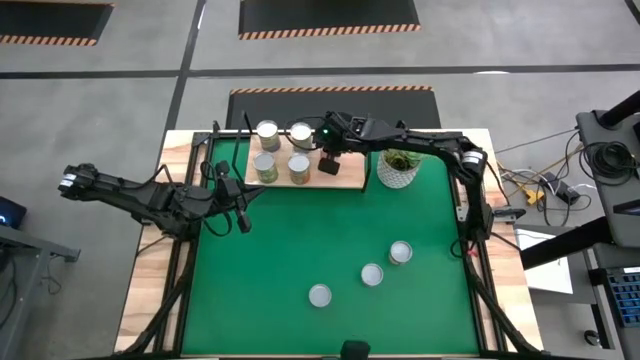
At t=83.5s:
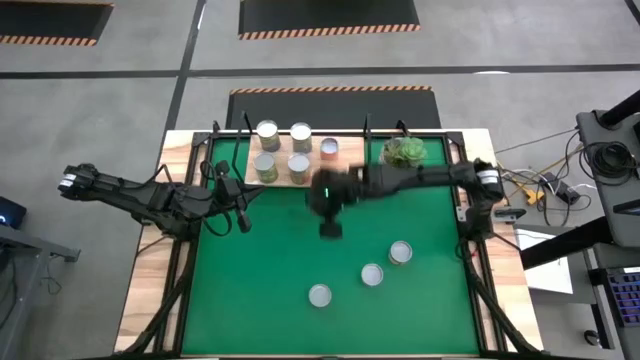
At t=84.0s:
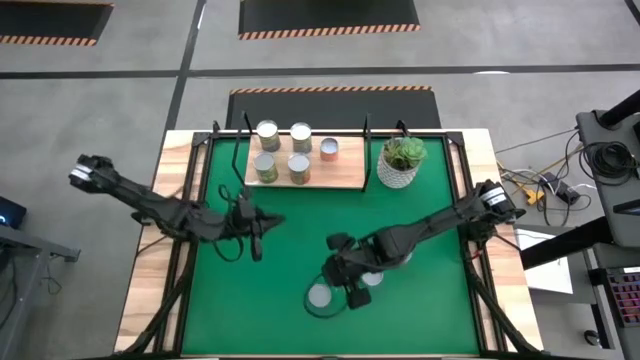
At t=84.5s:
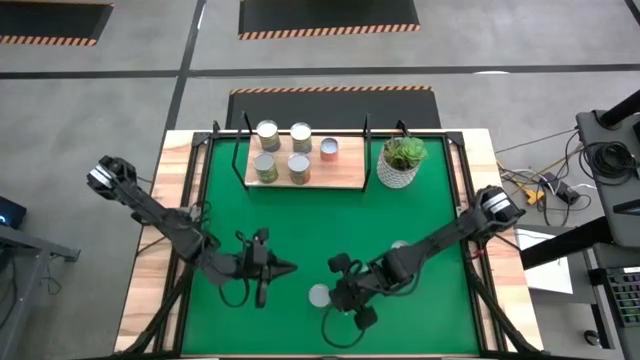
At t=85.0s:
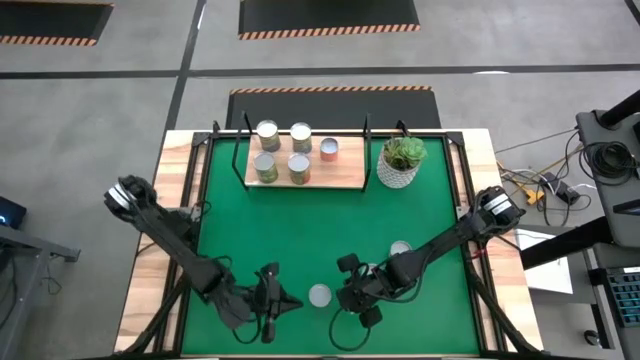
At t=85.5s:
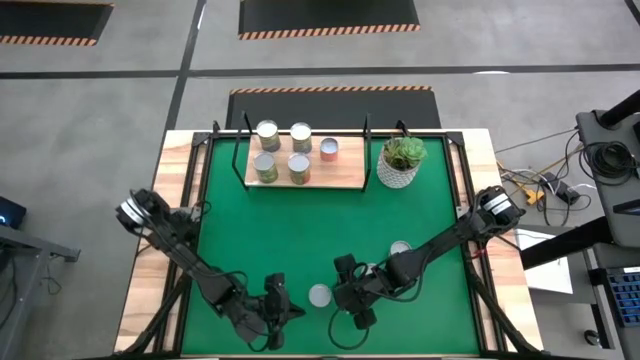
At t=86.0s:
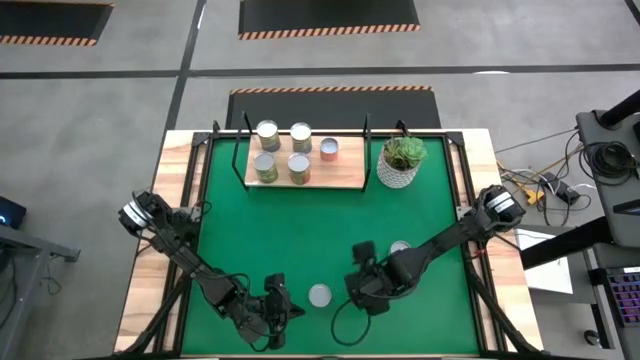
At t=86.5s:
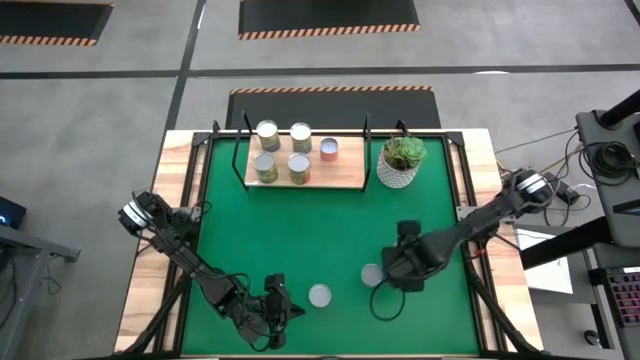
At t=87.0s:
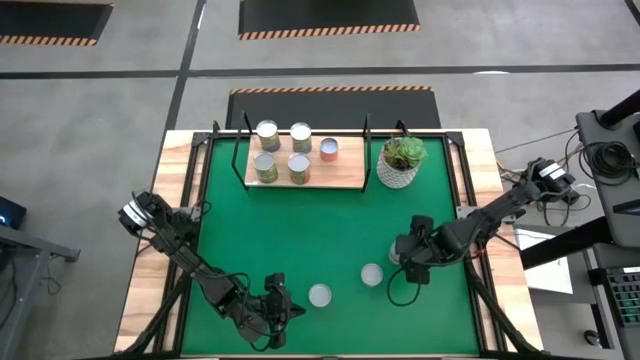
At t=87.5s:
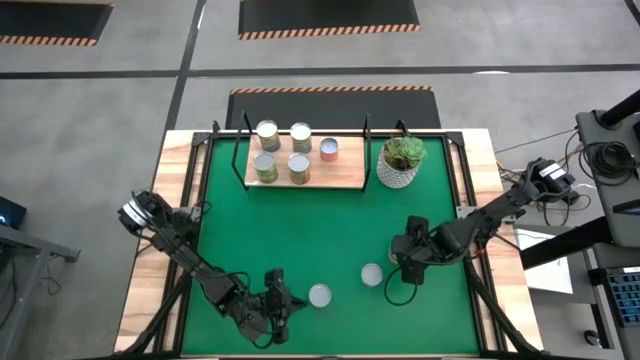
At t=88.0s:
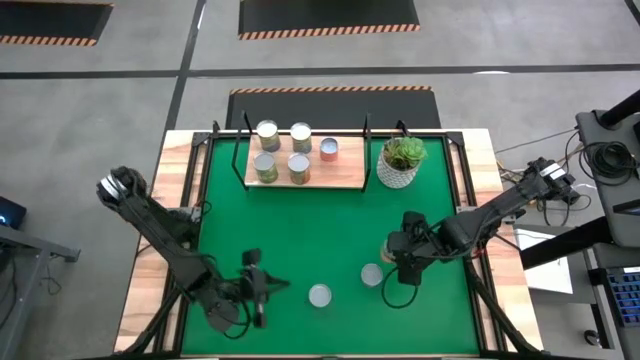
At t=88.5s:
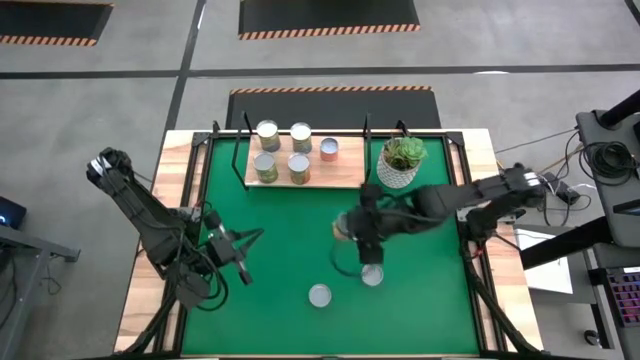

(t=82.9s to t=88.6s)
Task: Pick and place cans onto a shelf
Put the canned peach on the shelf

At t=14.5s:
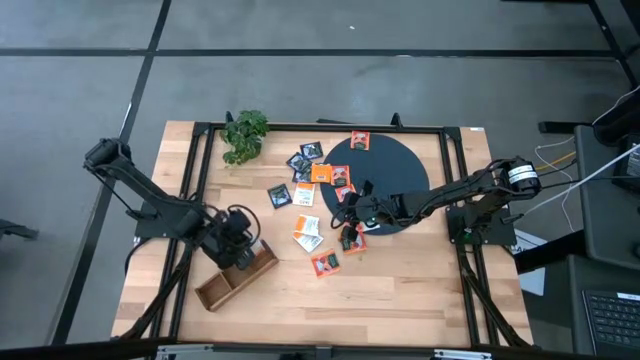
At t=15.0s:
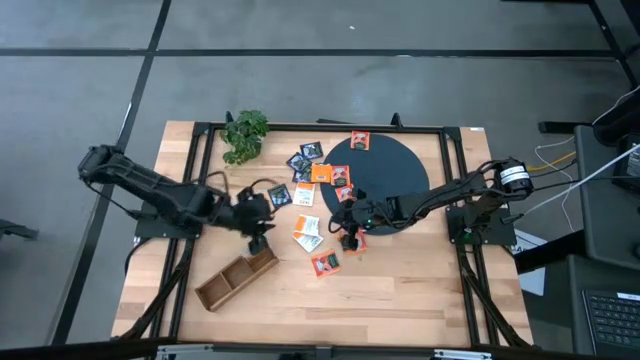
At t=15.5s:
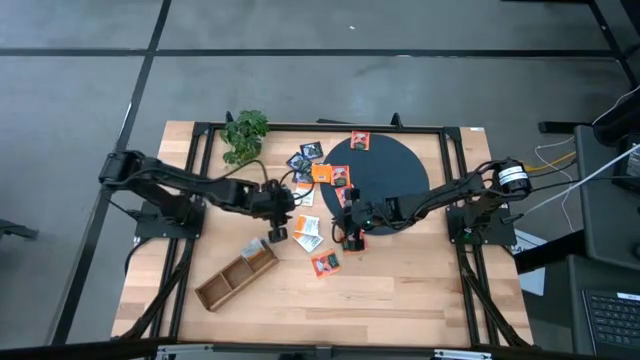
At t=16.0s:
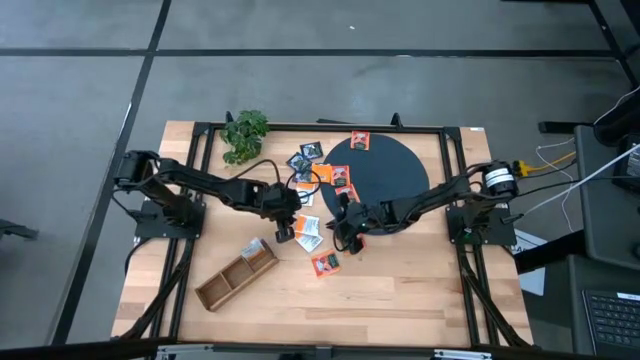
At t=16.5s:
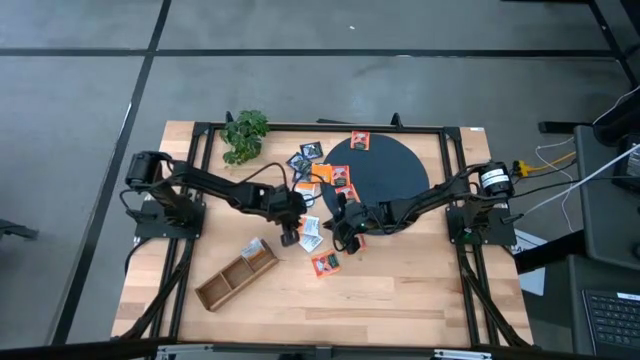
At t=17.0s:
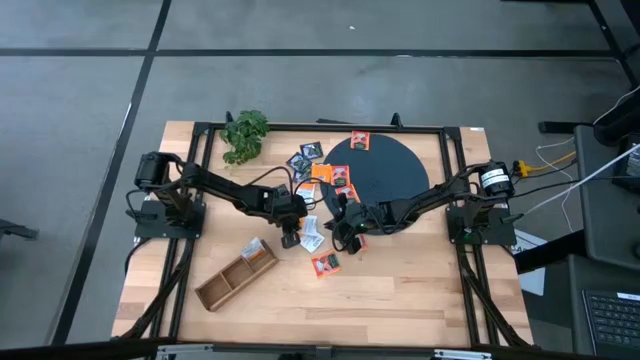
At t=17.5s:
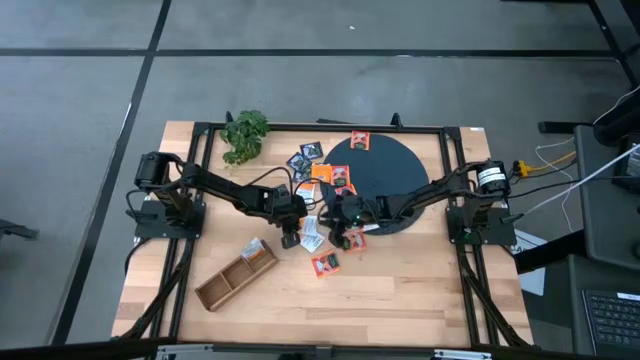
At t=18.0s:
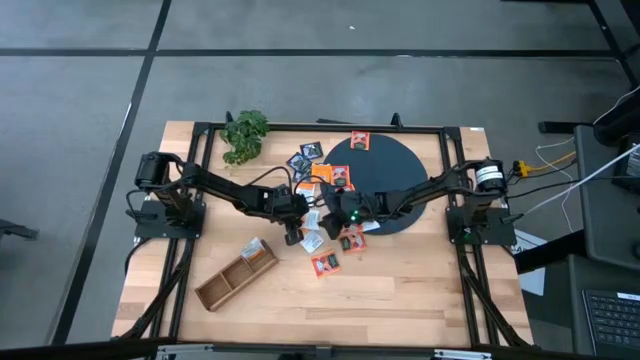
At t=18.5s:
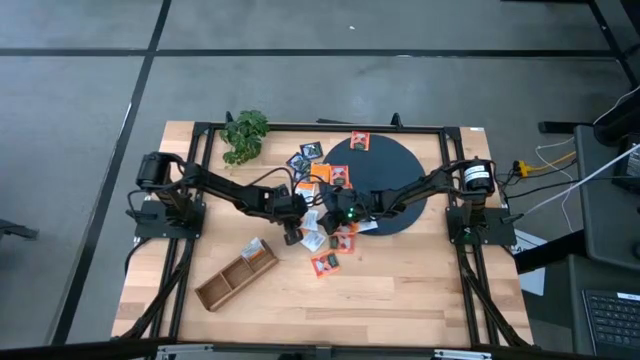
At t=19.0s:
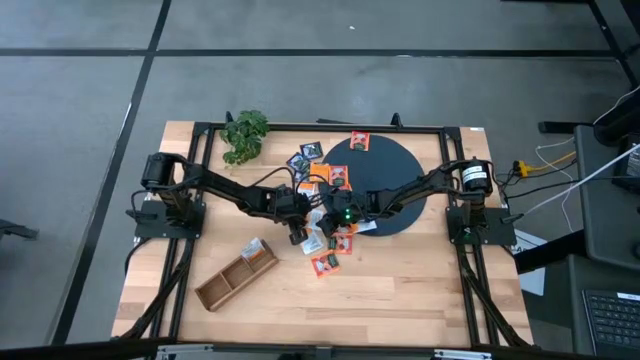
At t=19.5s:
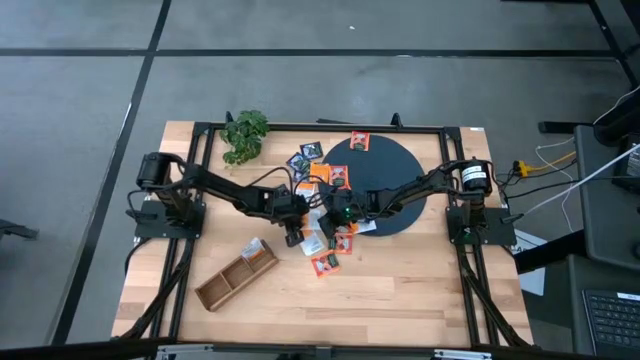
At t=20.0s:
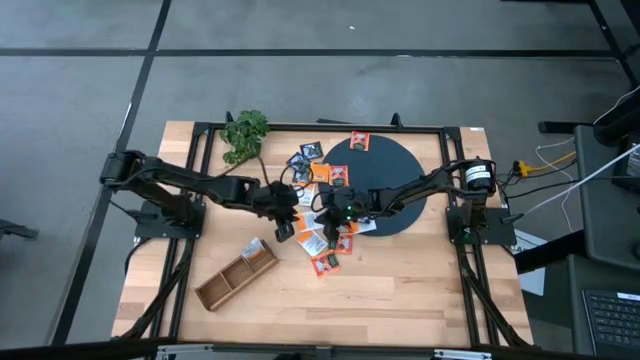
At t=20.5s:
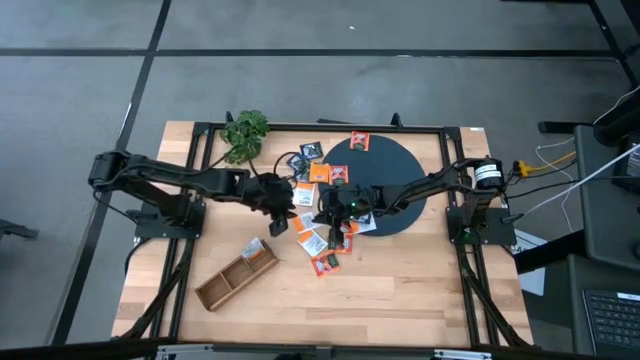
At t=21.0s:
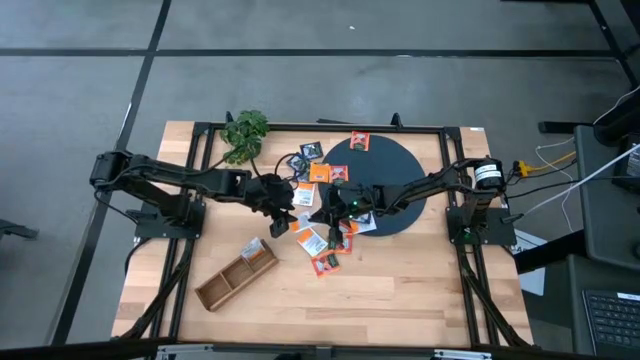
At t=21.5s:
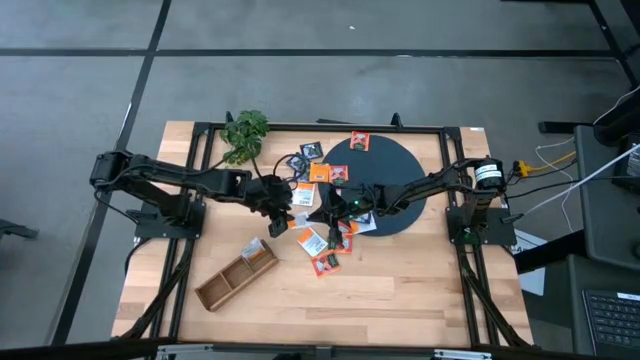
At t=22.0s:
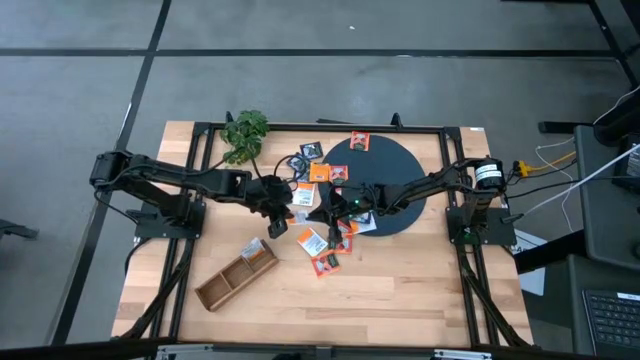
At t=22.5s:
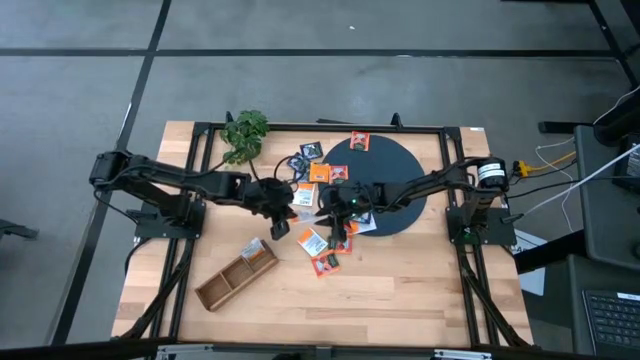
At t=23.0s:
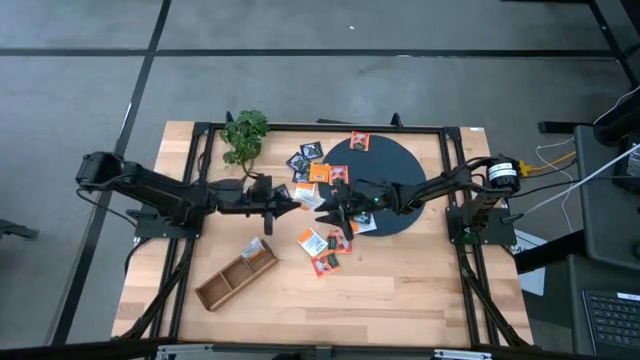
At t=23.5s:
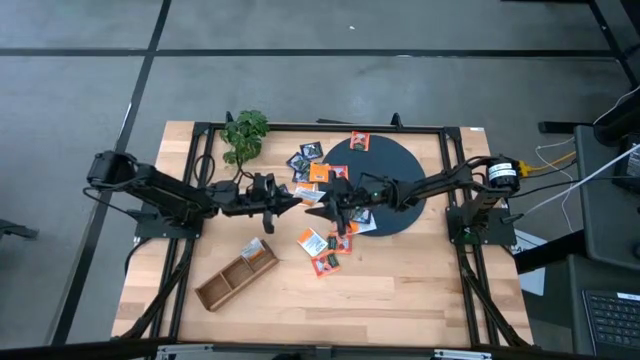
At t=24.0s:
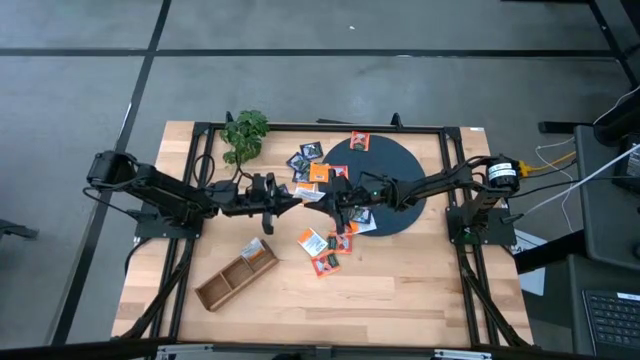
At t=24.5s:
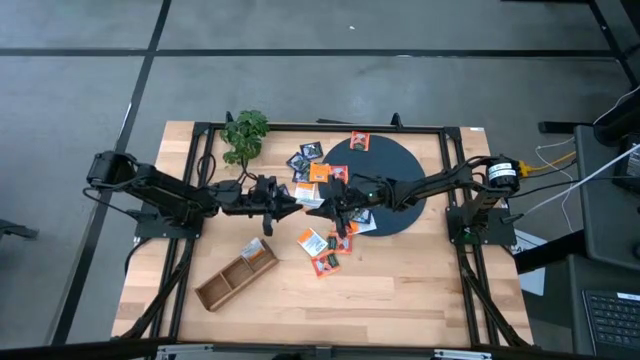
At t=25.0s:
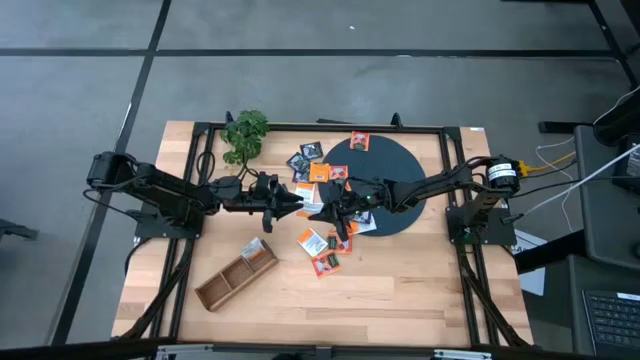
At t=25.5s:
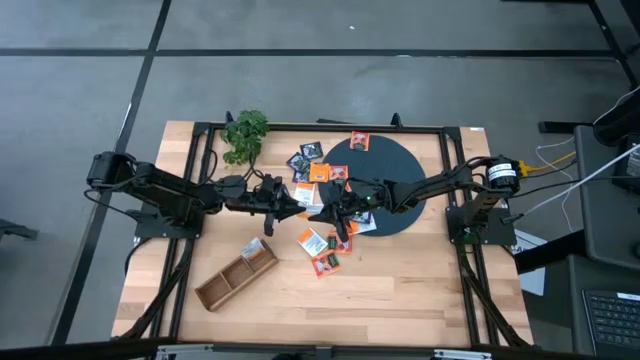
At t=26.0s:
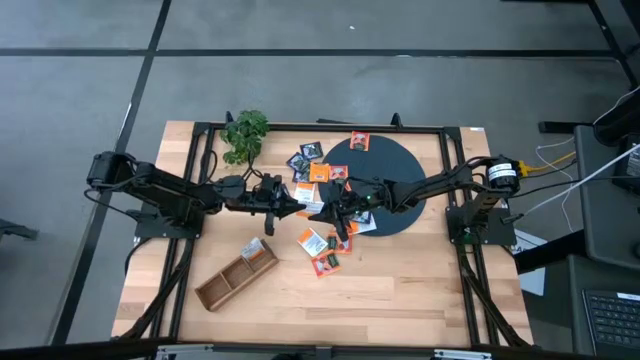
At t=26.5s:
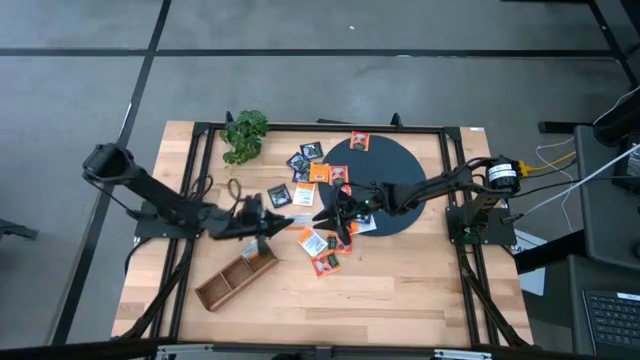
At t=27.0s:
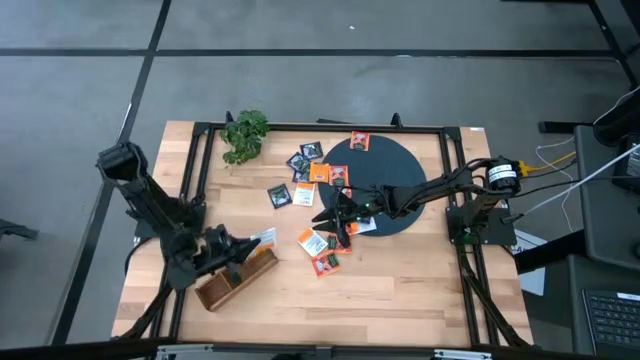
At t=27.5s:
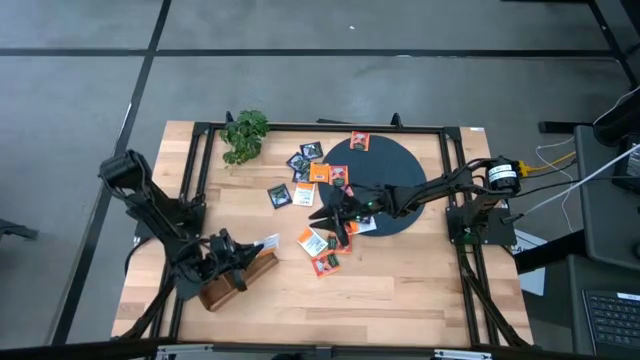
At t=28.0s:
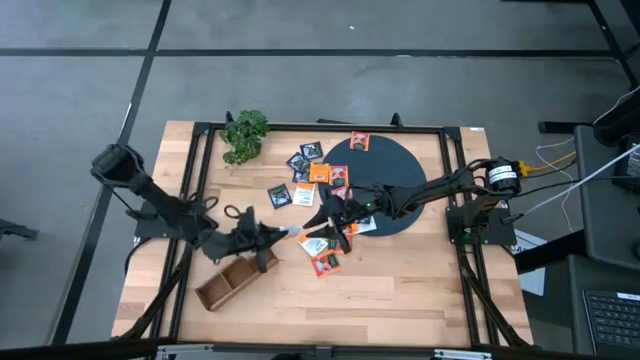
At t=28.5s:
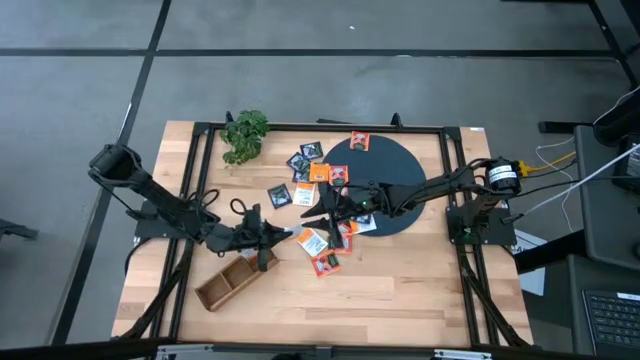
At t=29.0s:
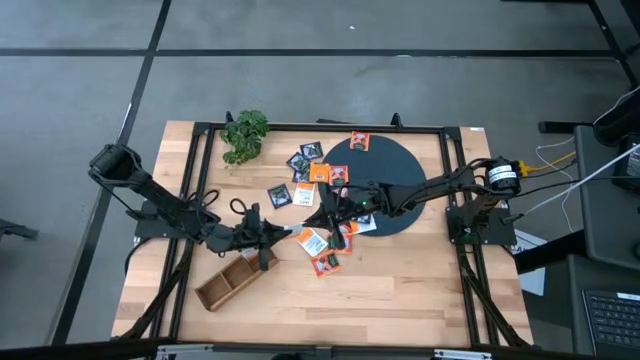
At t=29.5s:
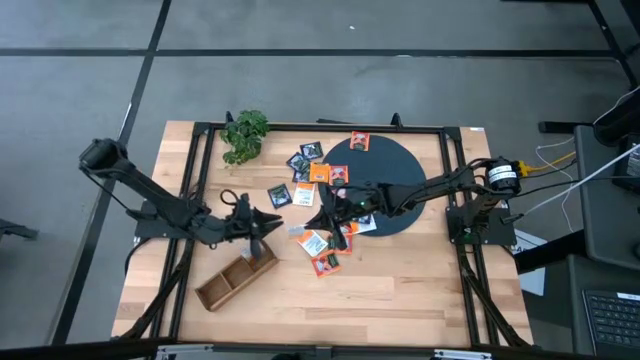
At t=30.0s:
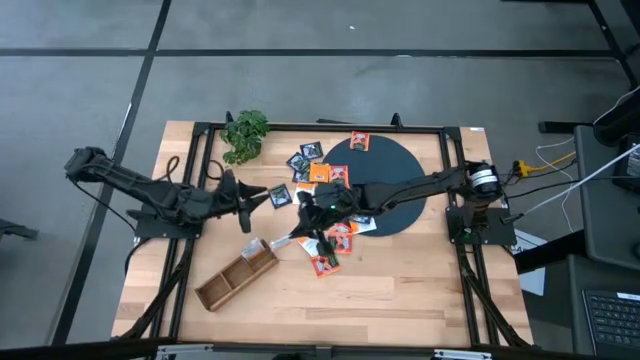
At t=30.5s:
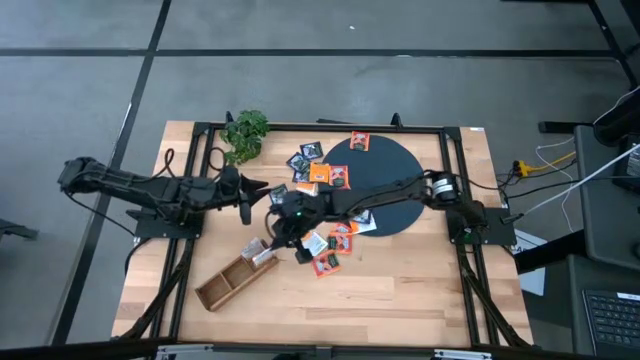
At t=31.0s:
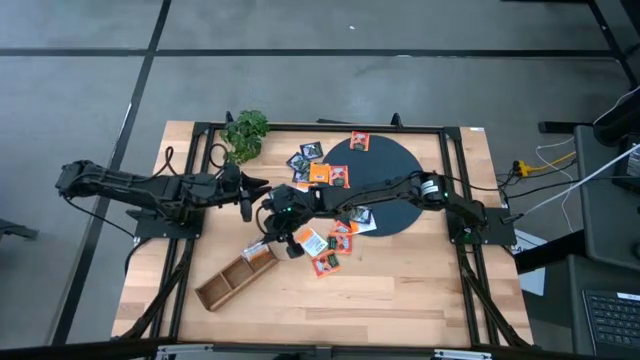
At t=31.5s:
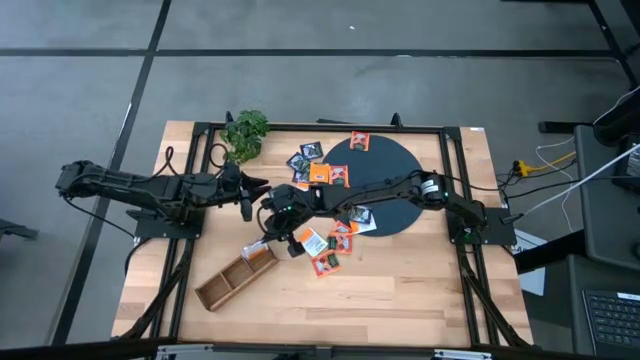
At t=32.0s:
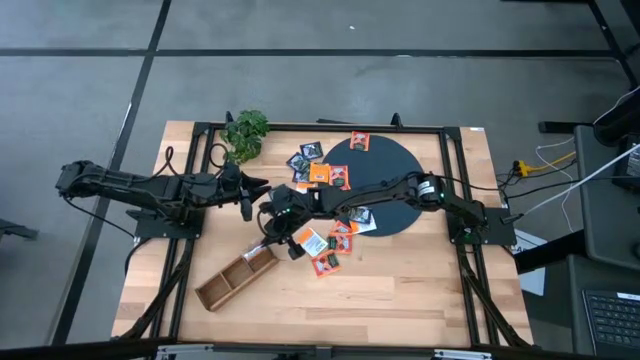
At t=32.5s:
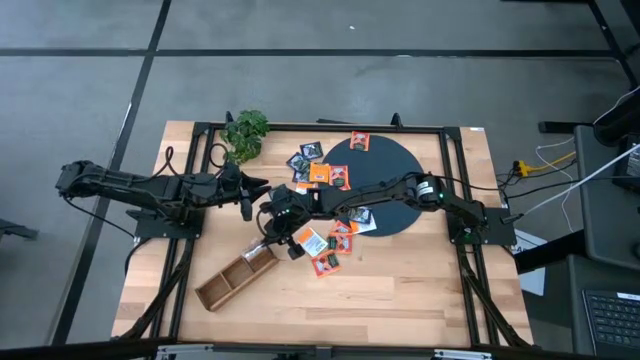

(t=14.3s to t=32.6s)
Task: Pick & Place Tea
Put the white tea bag into the right section of the wooden organizer
